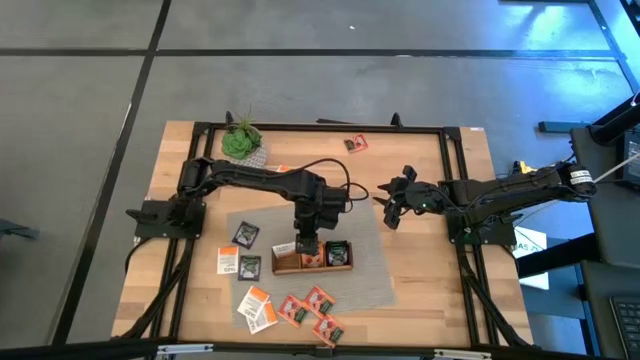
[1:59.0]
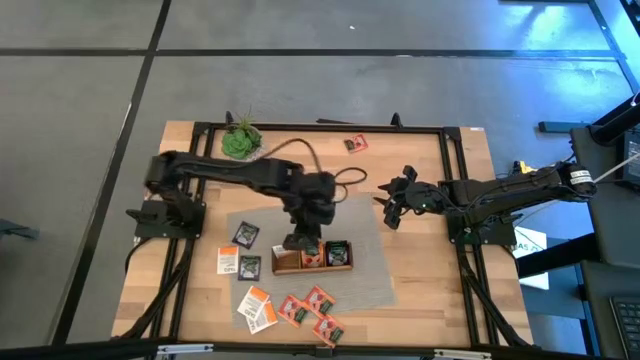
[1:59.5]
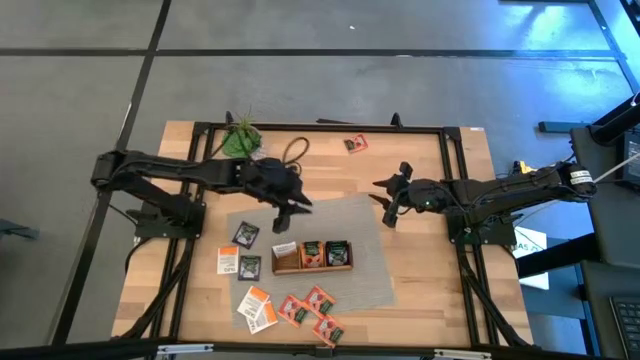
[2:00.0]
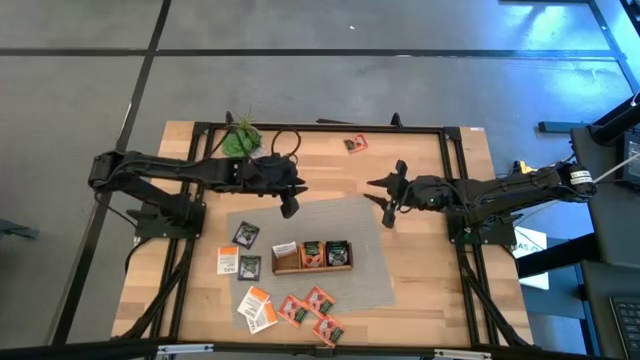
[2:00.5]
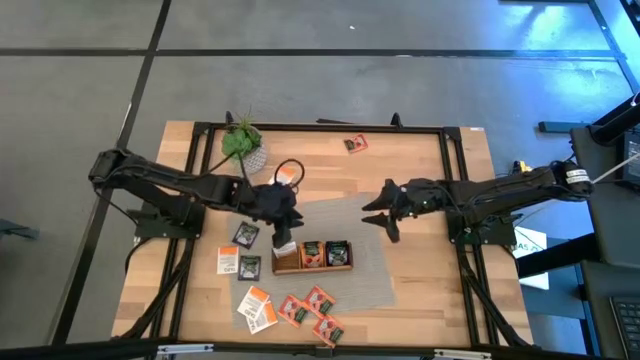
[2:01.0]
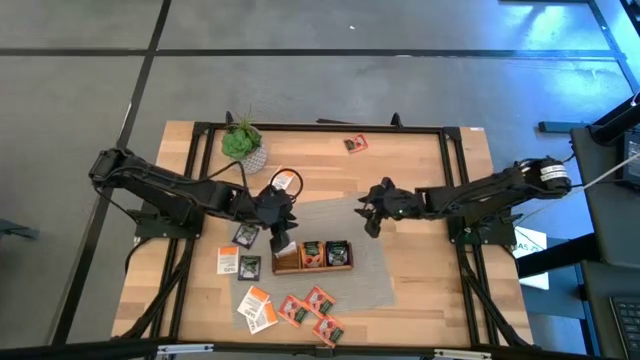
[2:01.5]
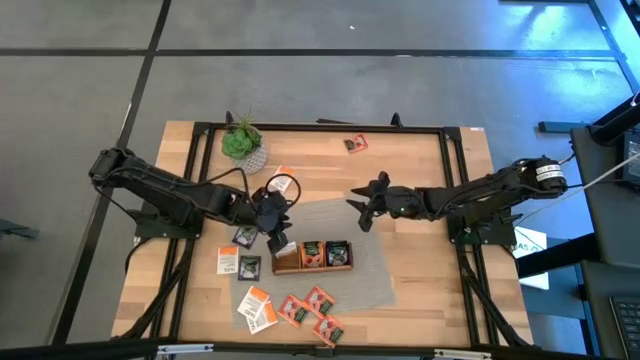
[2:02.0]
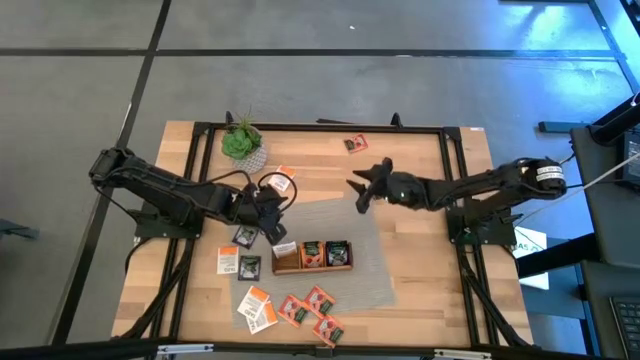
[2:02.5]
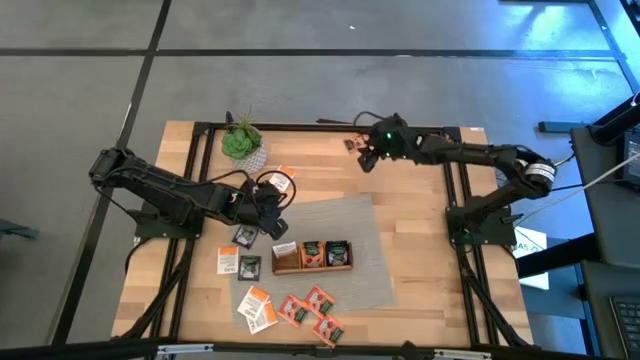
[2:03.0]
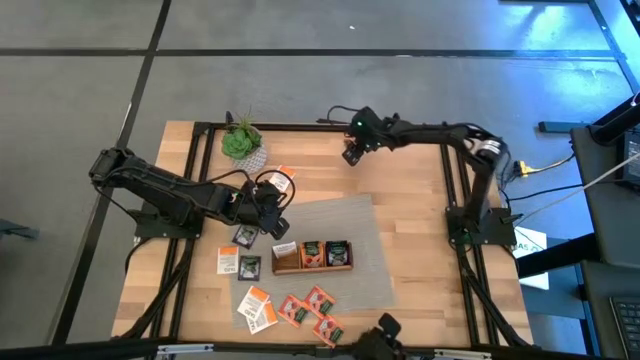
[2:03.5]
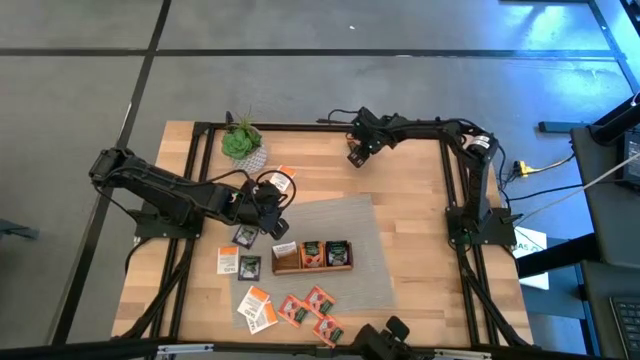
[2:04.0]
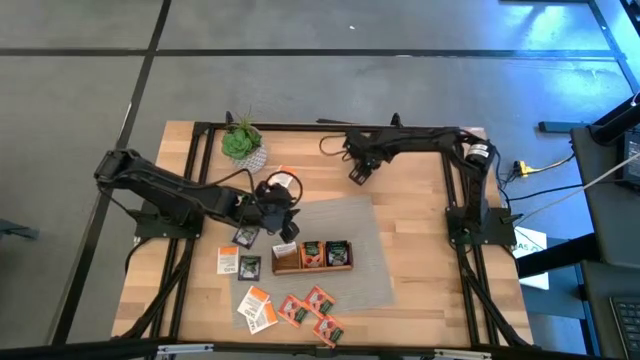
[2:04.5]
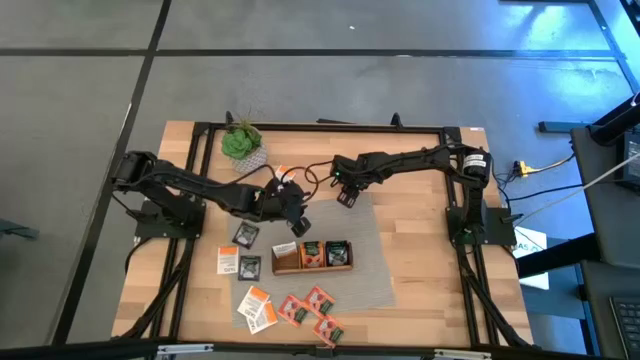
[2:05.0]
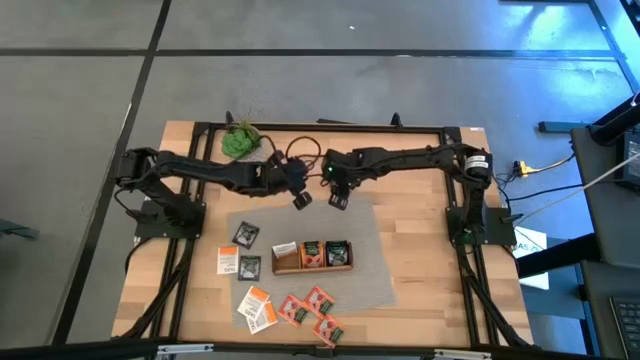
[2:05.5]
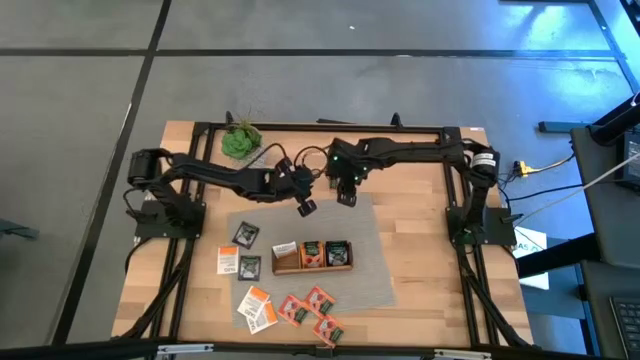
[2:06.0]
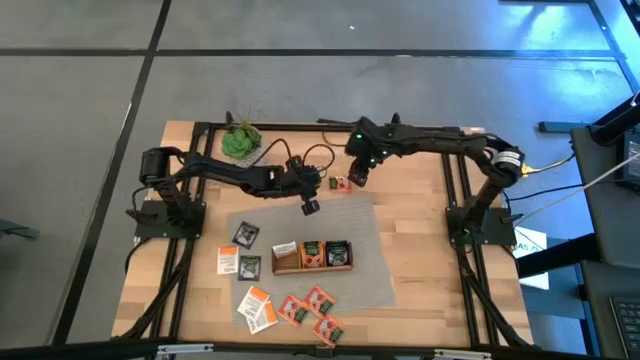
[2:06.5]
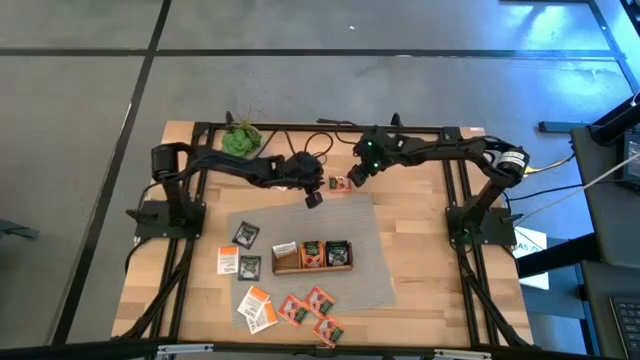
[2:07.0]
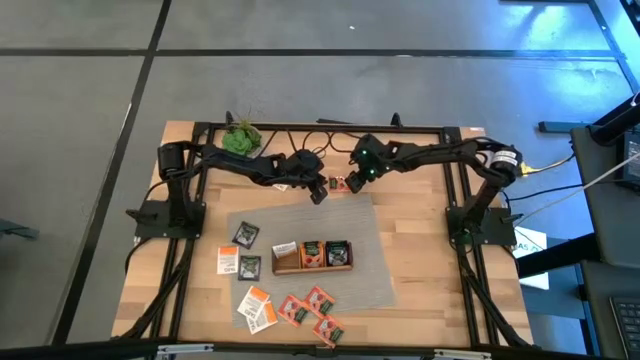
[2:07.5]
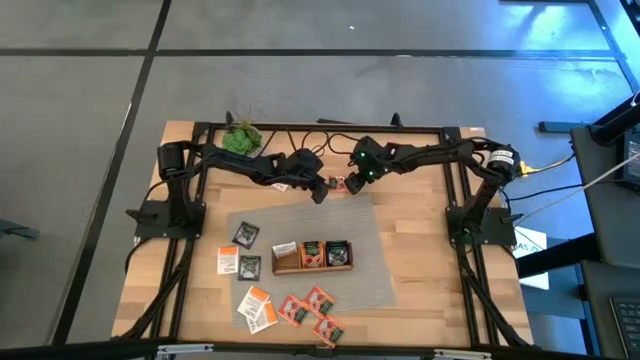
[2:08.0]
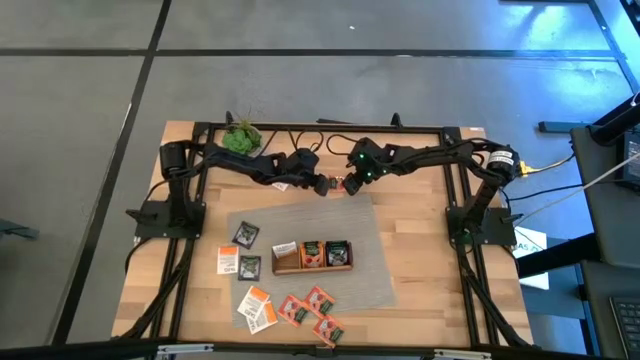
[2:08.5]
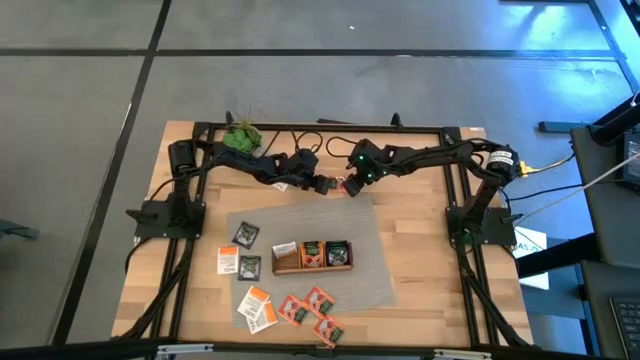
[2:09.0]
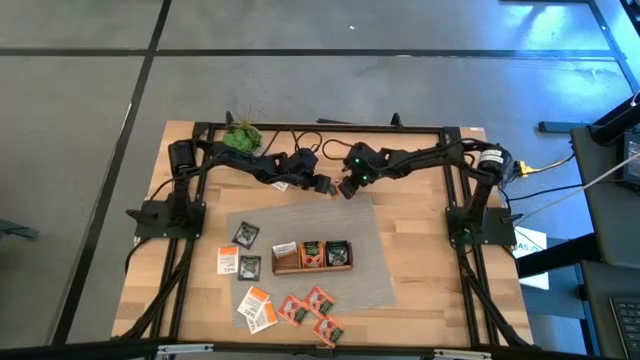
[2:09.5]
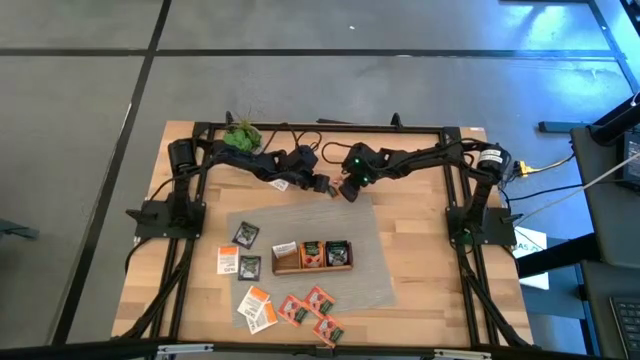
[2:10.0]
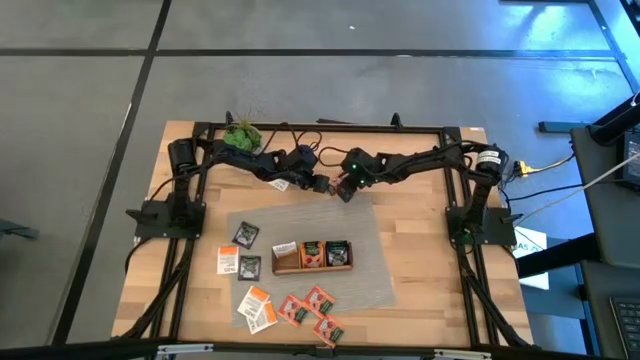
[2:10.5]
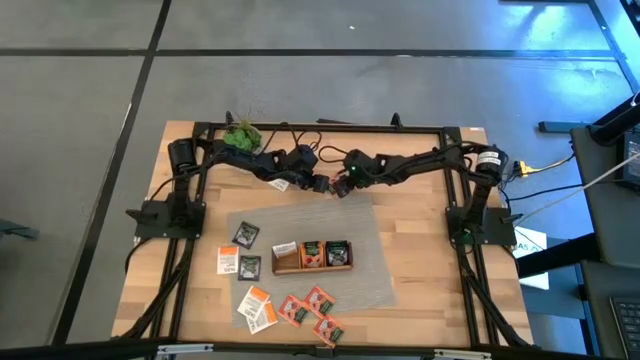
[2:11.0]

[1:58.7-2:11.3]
Task: Pick & Place Tea
Put the orange tea bag into the middle section of the wooden organizer

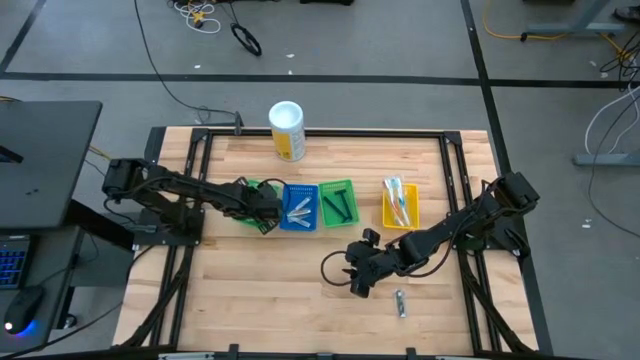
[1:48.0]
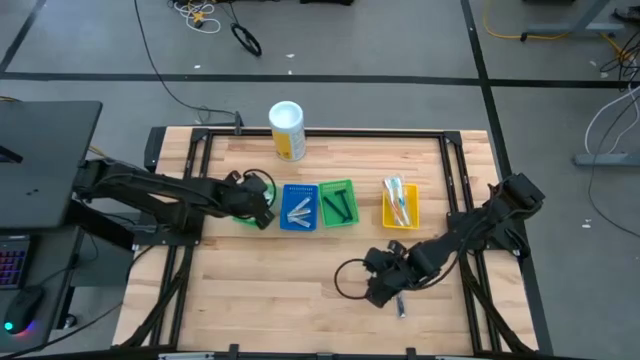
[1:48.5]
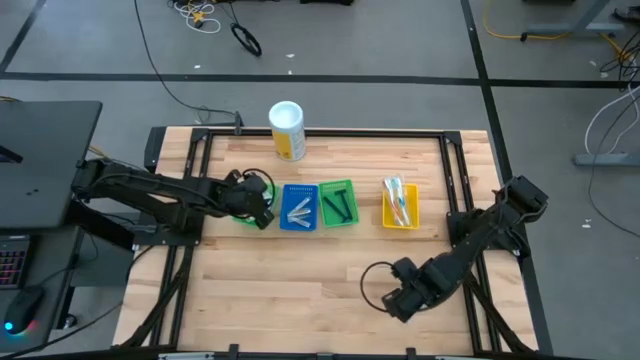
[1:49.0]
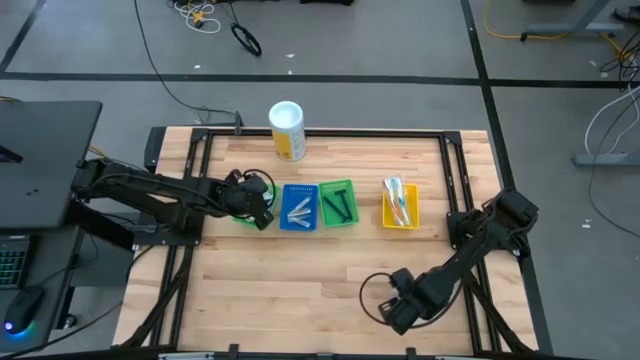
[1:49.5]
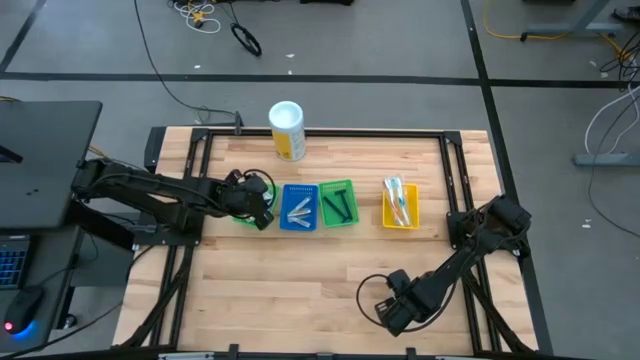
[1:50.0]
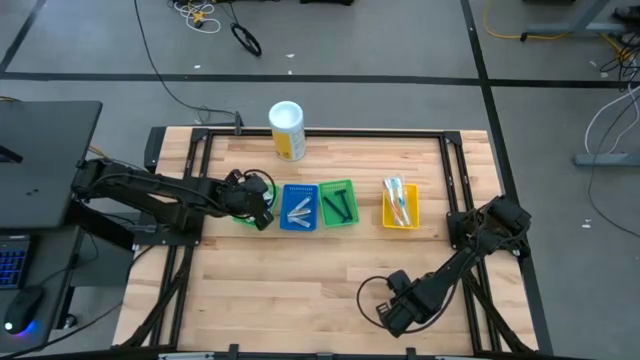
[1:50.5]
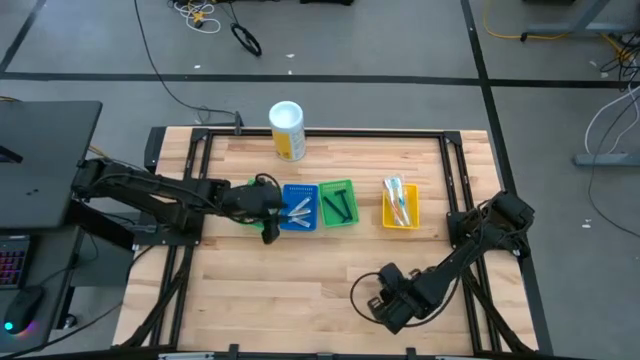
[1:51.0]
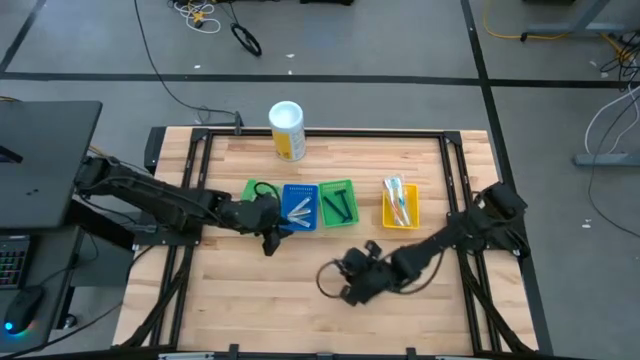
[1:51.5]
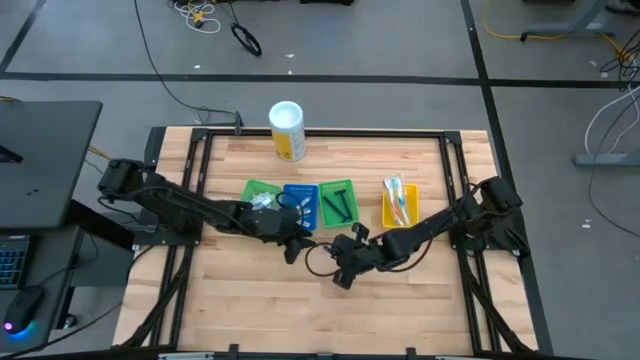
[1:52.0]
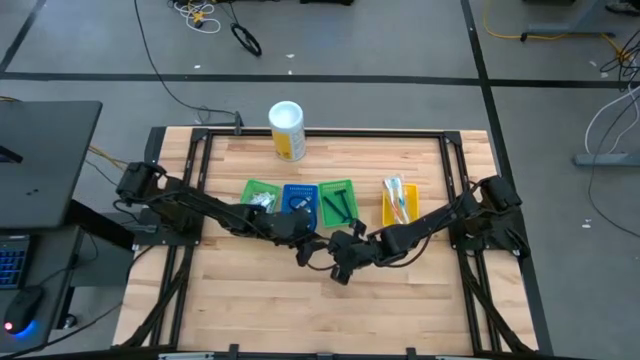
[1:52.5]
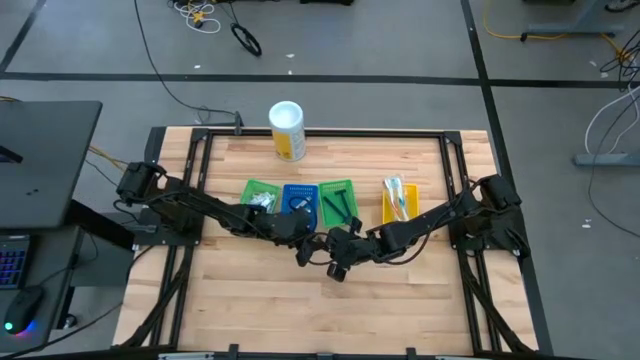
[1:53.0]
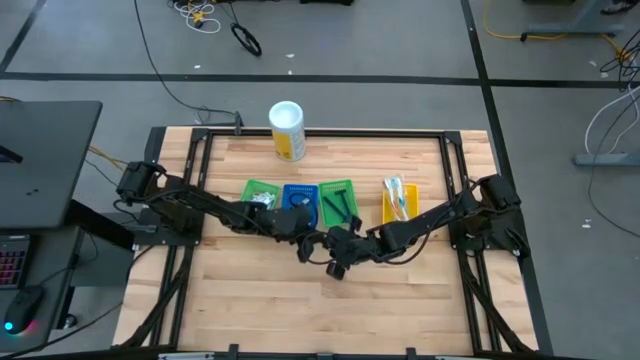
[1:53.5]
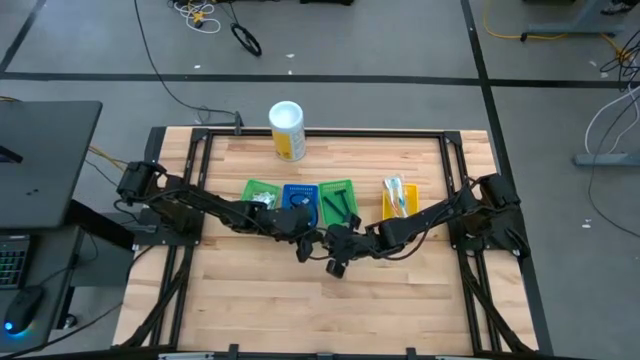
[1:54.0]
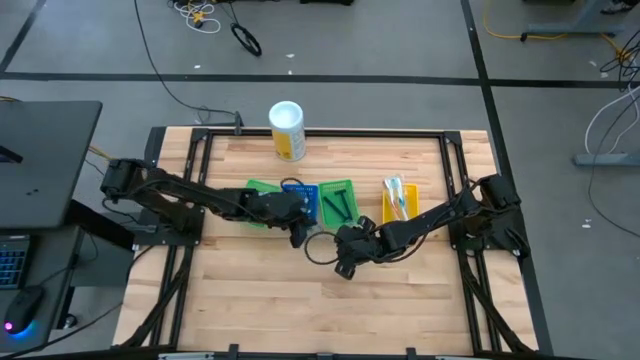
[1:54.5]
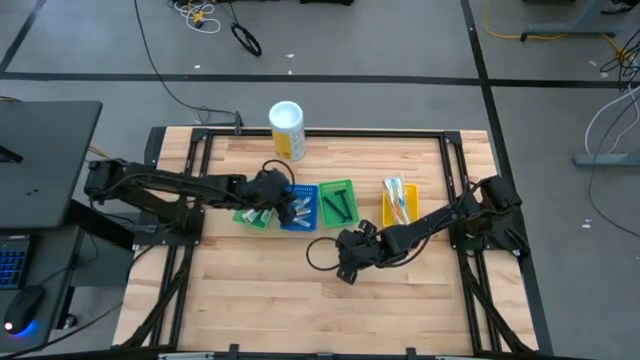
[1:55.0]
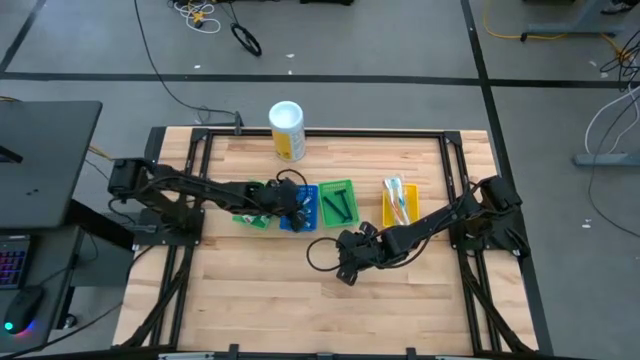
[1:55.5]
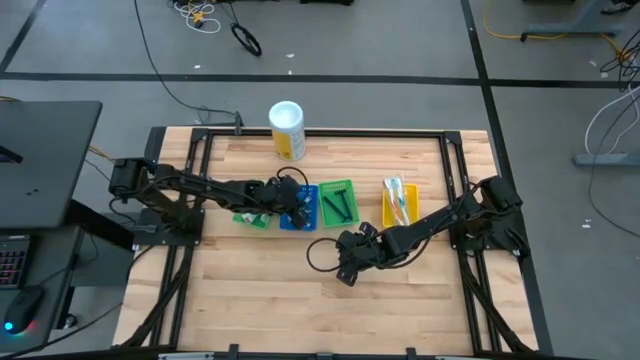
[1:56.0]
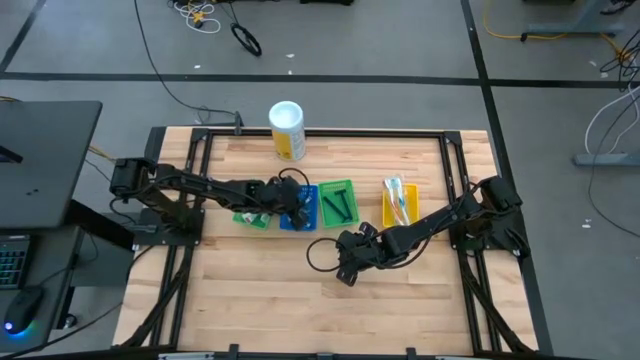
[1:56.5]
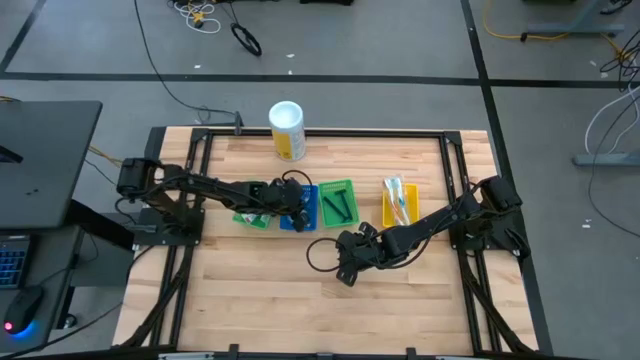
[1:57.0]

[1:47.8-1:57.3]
Task: Pick & Place Travel size toiletries
Put the silver nail cutter into the blue bin

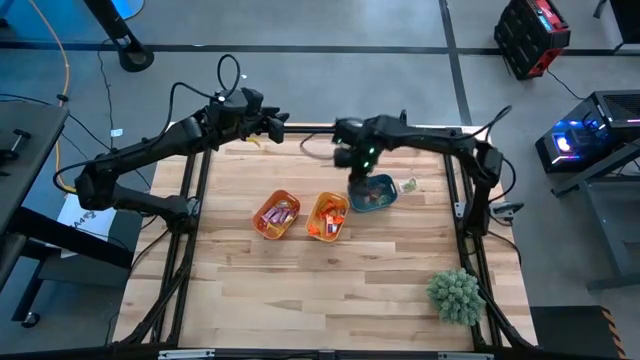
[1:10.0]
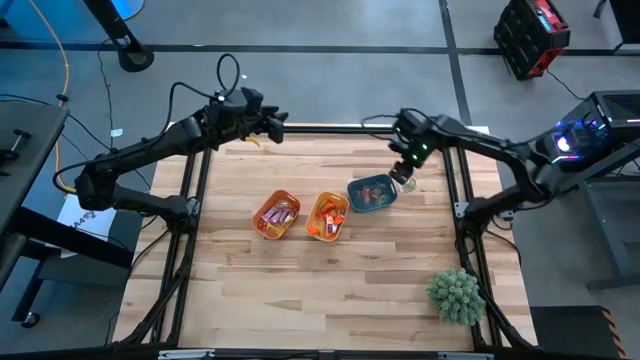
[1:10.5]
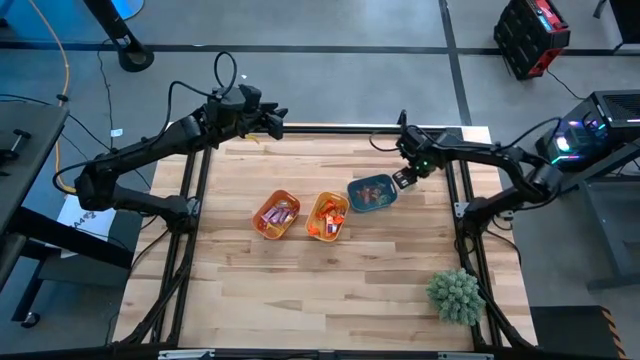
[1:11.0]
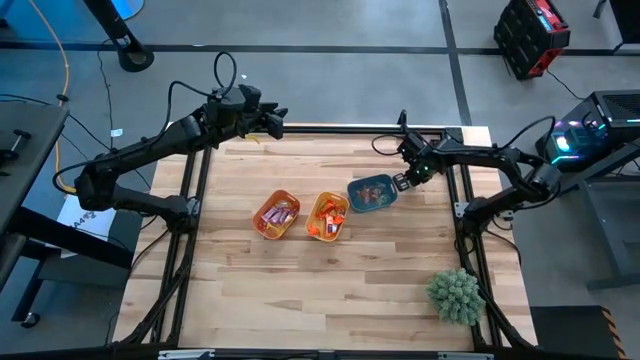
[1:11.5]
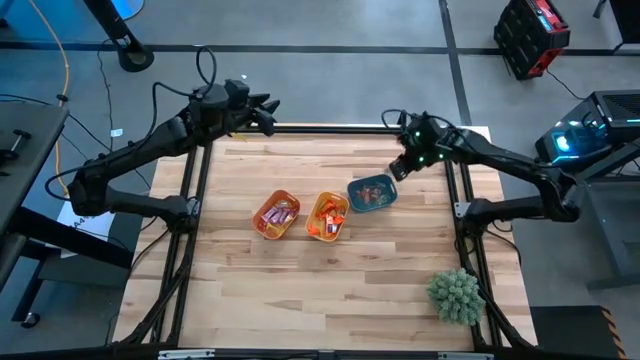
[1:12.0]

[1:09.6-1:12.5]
Task: Sort candy
Put the green gummy into the blue bin
